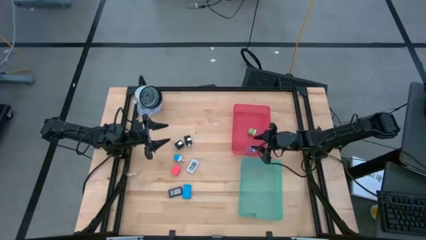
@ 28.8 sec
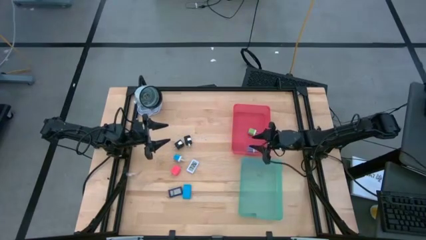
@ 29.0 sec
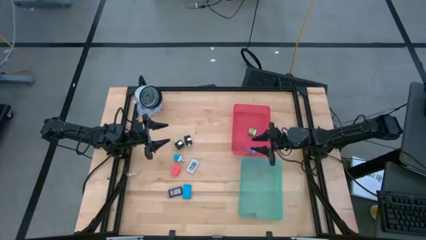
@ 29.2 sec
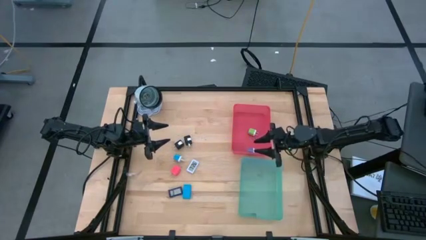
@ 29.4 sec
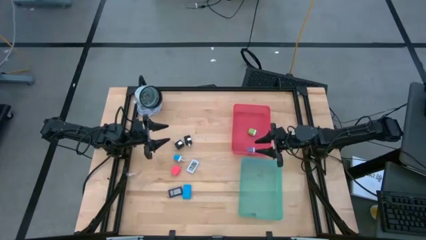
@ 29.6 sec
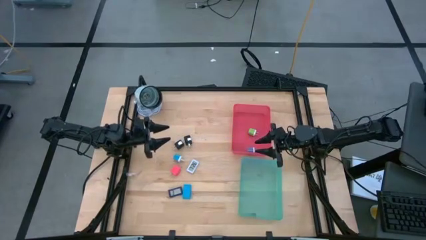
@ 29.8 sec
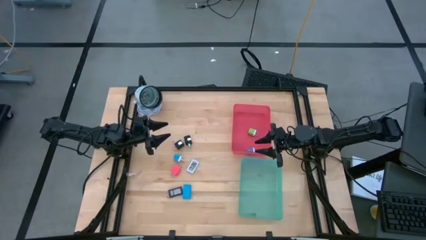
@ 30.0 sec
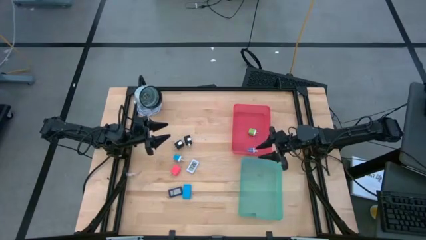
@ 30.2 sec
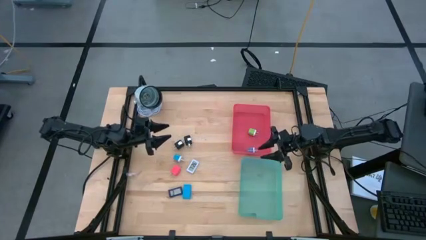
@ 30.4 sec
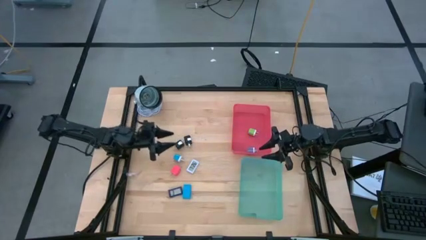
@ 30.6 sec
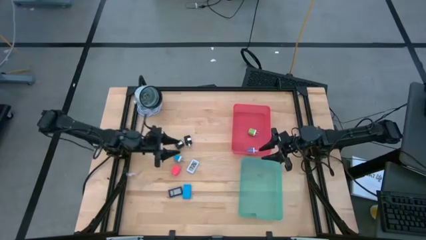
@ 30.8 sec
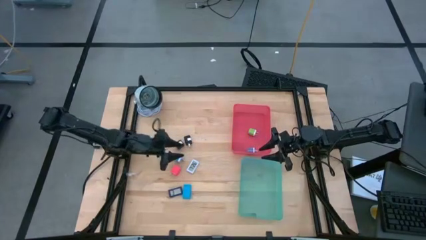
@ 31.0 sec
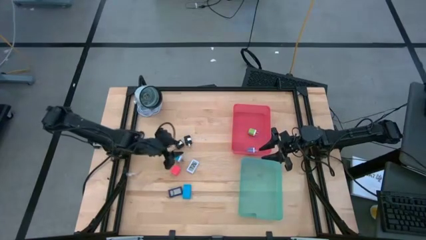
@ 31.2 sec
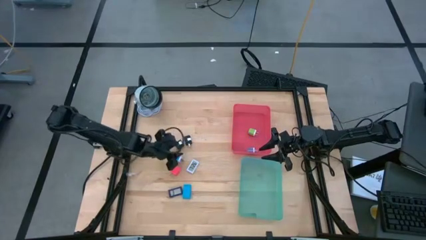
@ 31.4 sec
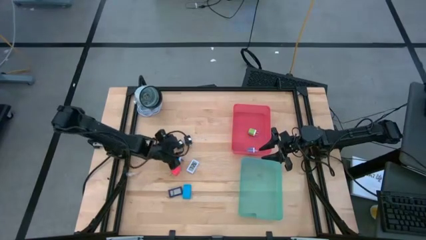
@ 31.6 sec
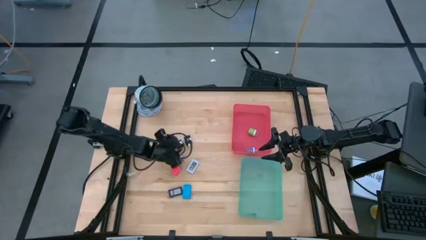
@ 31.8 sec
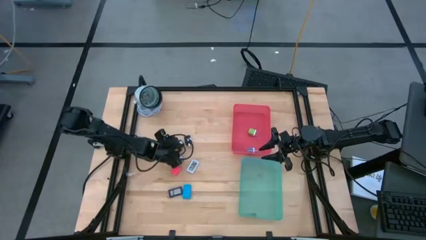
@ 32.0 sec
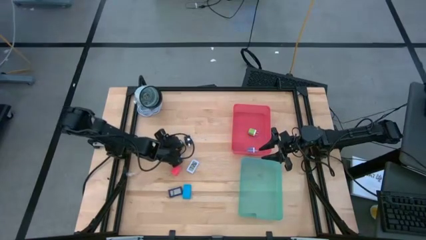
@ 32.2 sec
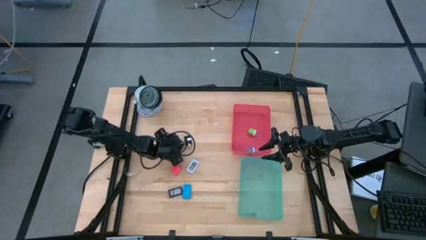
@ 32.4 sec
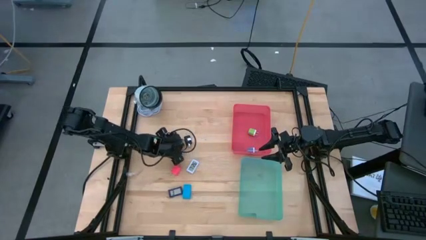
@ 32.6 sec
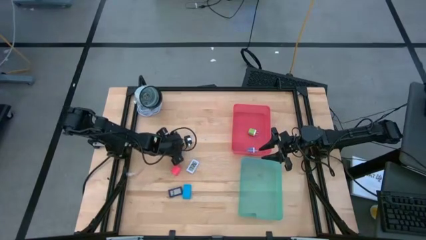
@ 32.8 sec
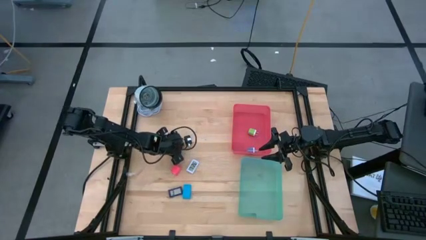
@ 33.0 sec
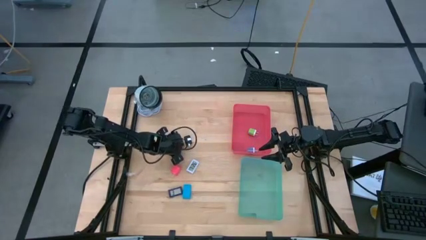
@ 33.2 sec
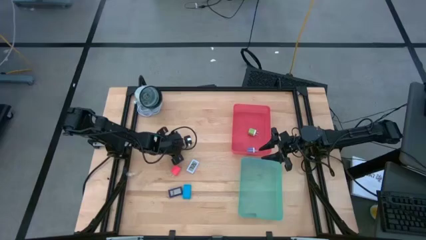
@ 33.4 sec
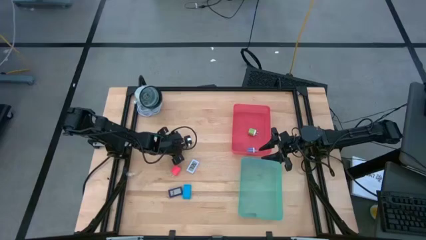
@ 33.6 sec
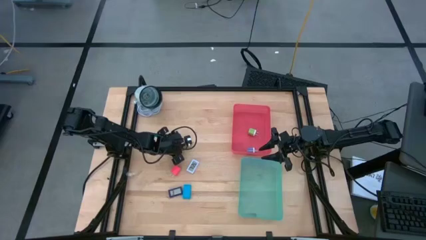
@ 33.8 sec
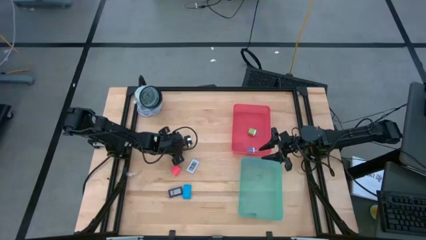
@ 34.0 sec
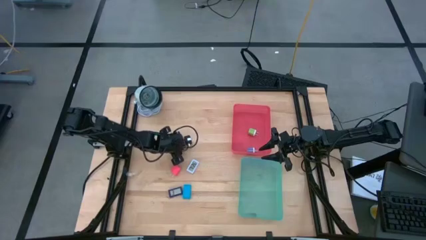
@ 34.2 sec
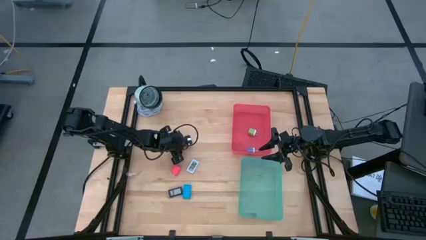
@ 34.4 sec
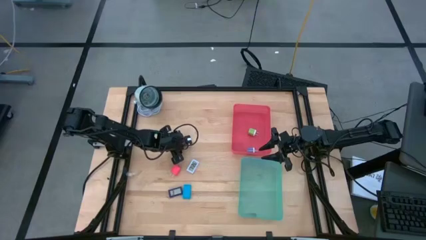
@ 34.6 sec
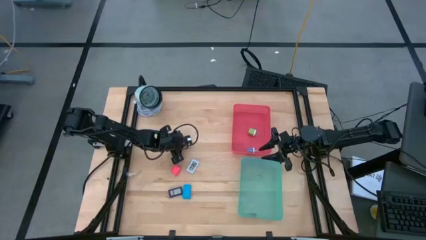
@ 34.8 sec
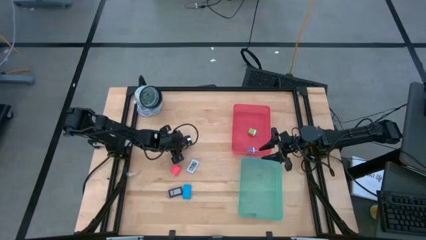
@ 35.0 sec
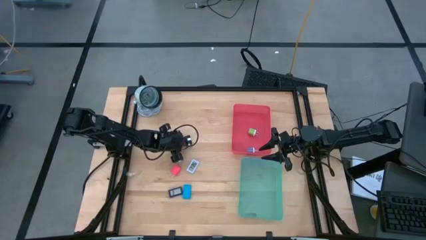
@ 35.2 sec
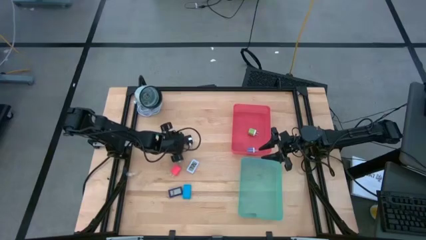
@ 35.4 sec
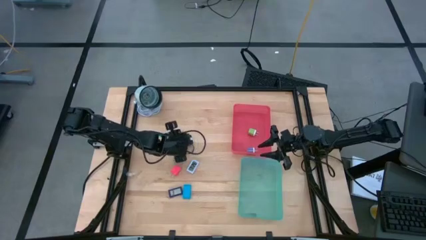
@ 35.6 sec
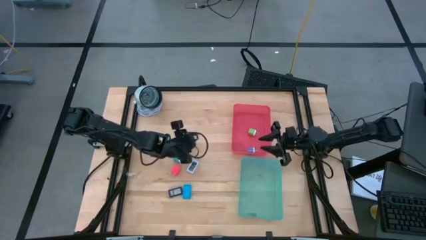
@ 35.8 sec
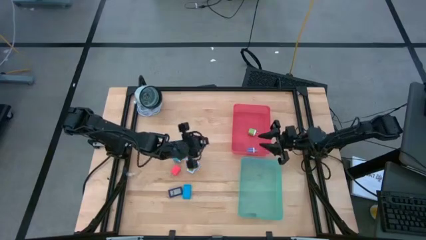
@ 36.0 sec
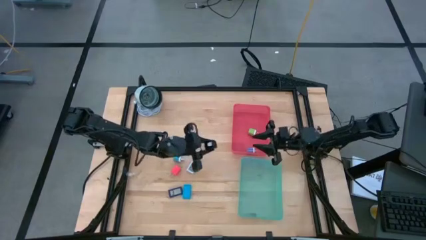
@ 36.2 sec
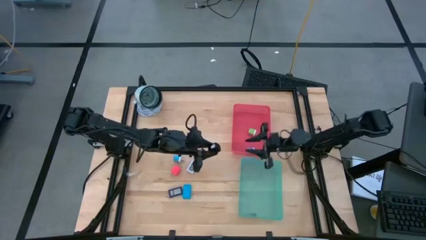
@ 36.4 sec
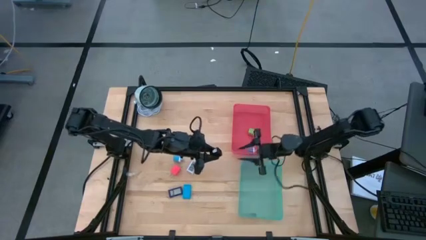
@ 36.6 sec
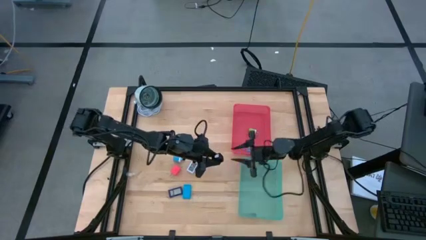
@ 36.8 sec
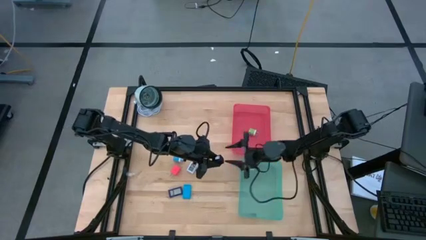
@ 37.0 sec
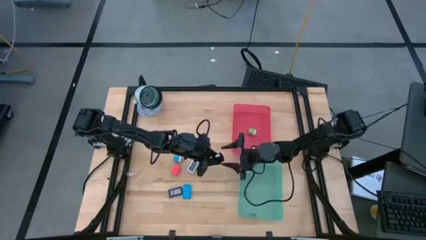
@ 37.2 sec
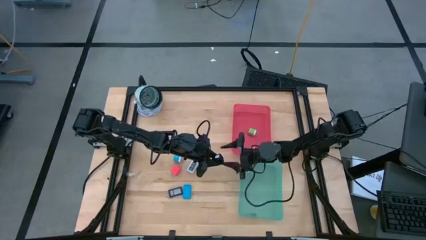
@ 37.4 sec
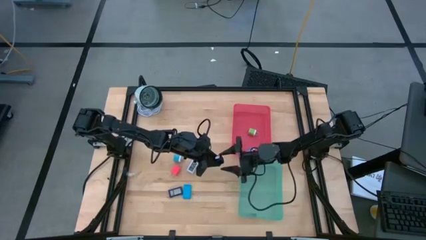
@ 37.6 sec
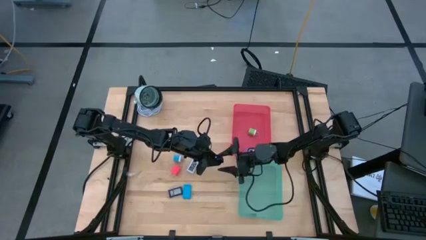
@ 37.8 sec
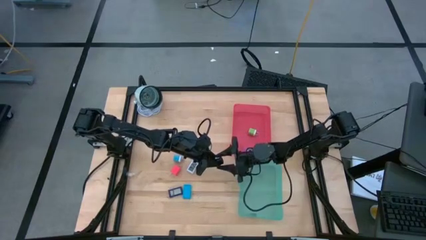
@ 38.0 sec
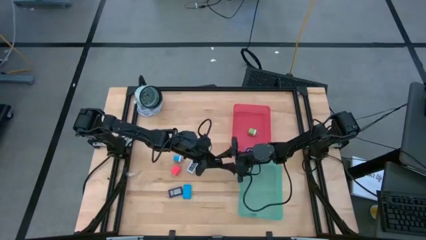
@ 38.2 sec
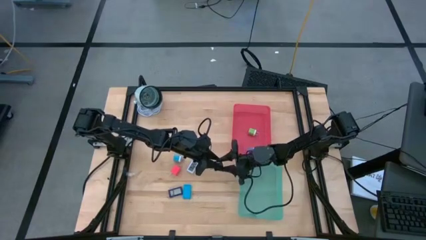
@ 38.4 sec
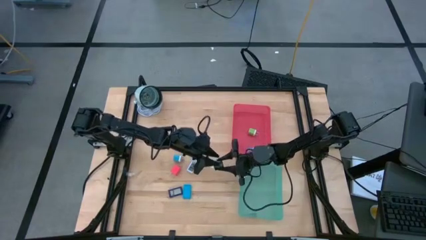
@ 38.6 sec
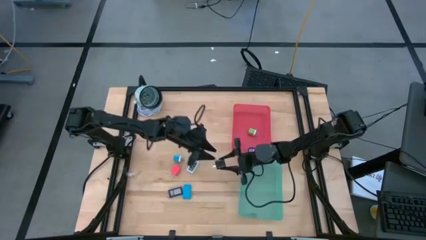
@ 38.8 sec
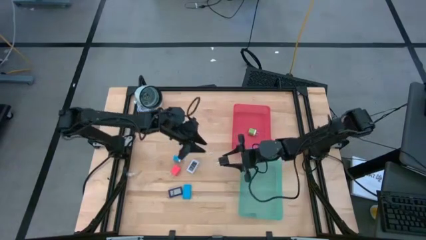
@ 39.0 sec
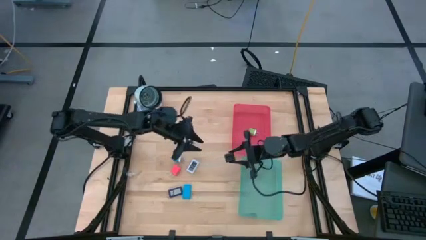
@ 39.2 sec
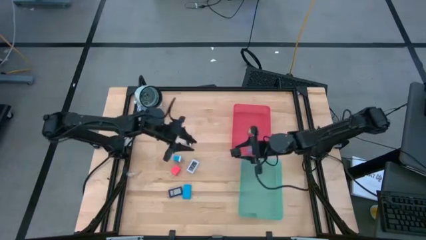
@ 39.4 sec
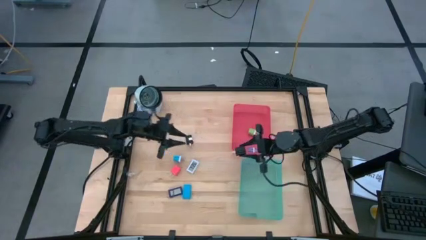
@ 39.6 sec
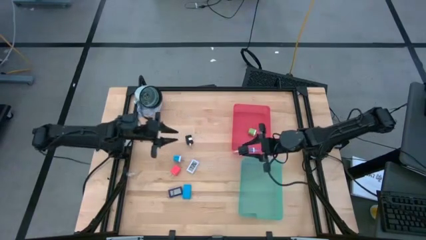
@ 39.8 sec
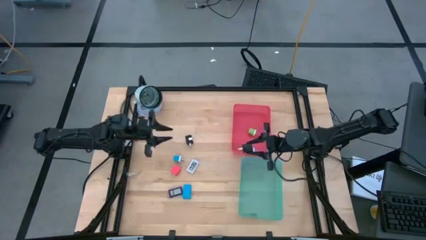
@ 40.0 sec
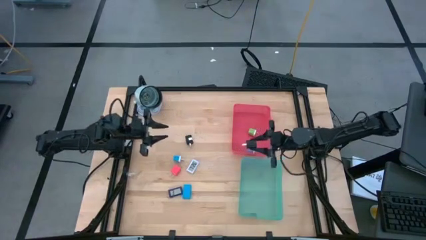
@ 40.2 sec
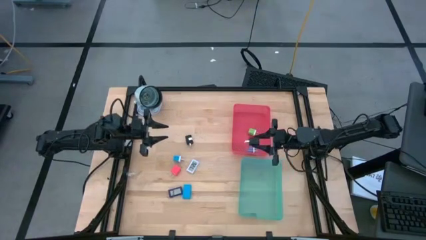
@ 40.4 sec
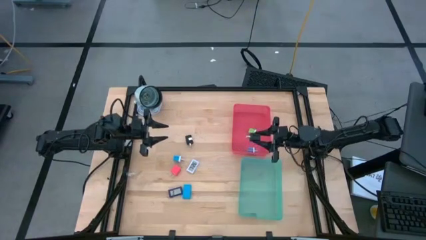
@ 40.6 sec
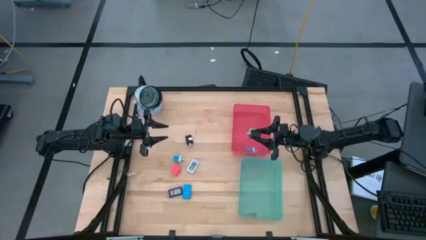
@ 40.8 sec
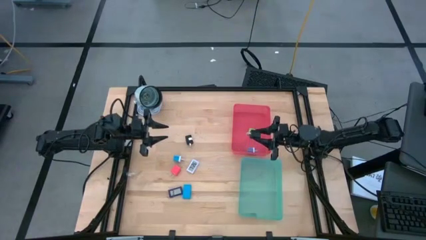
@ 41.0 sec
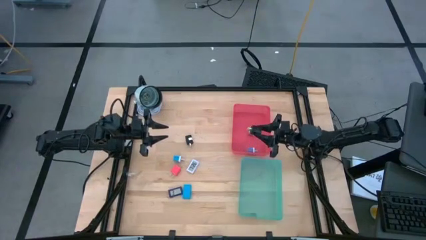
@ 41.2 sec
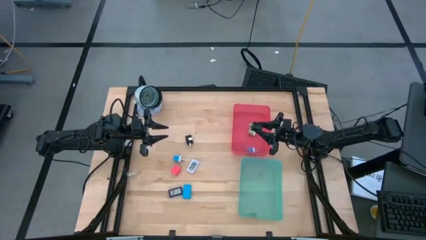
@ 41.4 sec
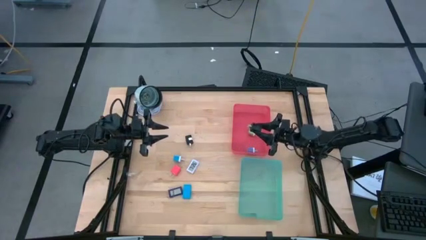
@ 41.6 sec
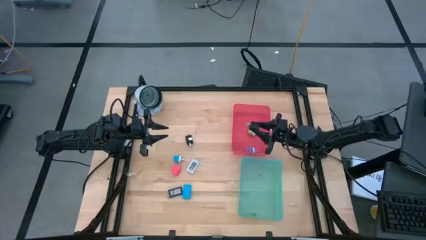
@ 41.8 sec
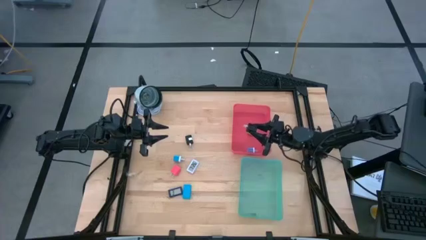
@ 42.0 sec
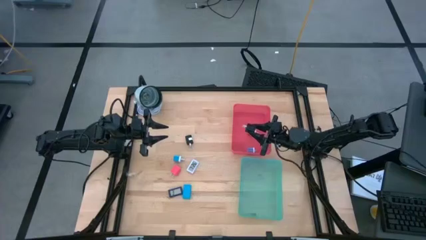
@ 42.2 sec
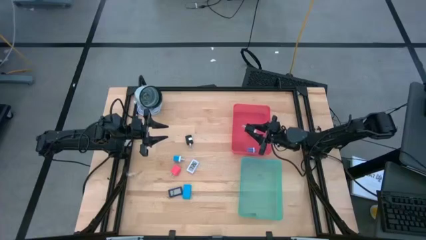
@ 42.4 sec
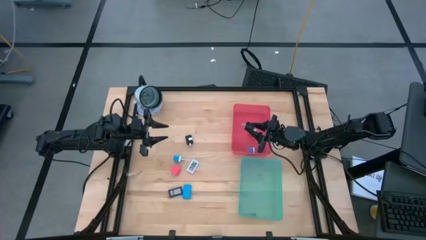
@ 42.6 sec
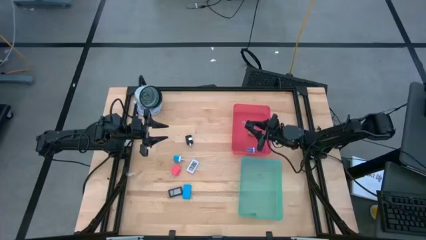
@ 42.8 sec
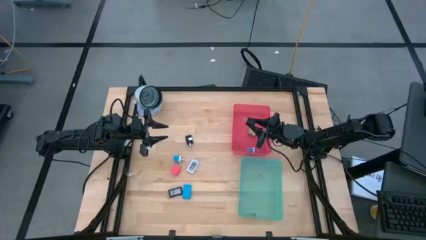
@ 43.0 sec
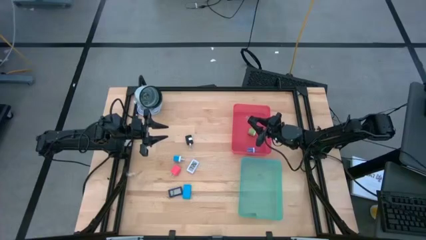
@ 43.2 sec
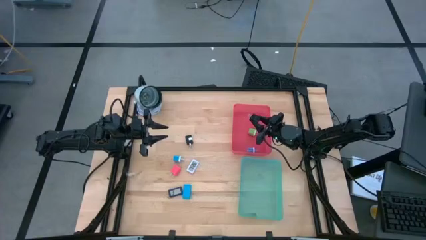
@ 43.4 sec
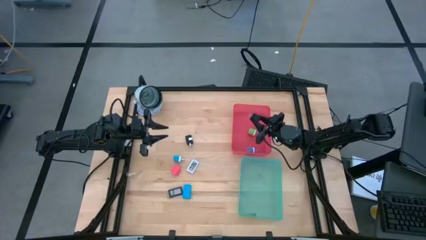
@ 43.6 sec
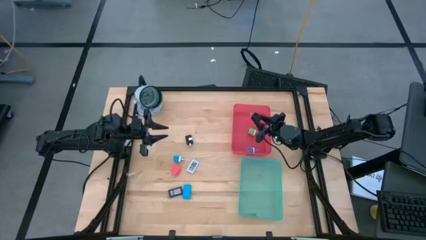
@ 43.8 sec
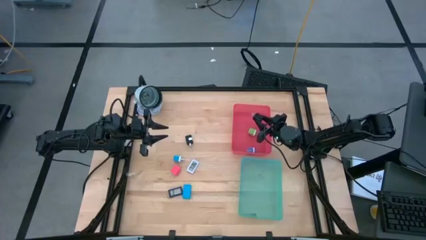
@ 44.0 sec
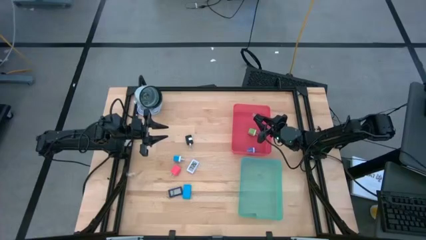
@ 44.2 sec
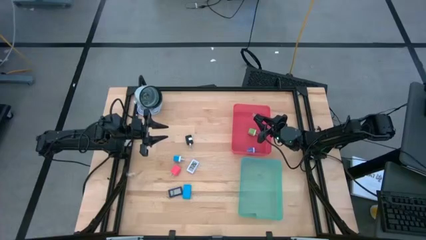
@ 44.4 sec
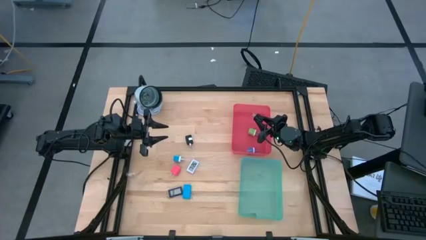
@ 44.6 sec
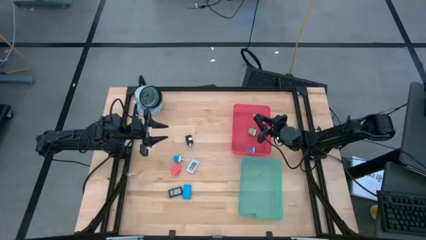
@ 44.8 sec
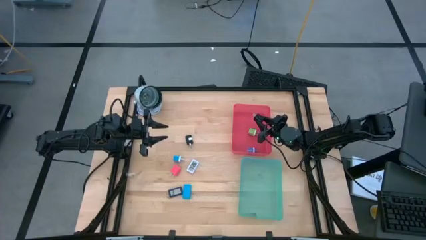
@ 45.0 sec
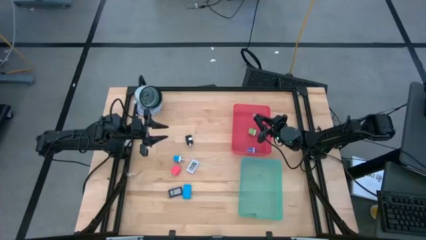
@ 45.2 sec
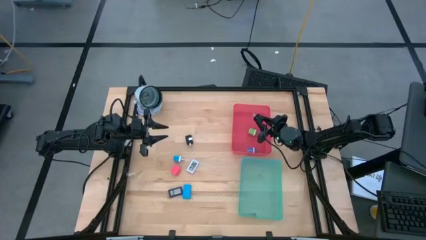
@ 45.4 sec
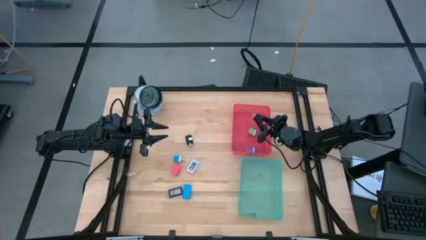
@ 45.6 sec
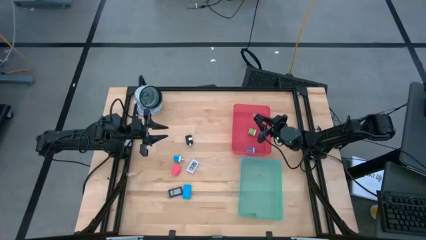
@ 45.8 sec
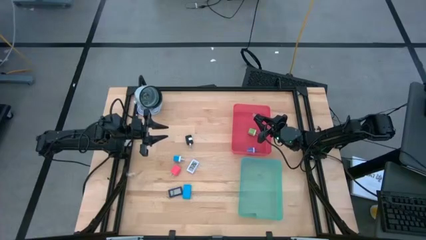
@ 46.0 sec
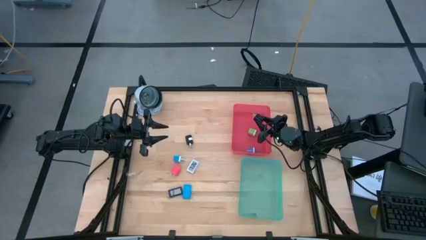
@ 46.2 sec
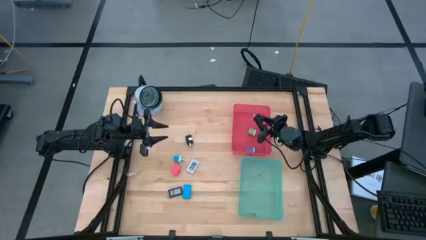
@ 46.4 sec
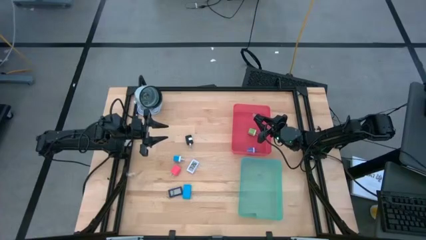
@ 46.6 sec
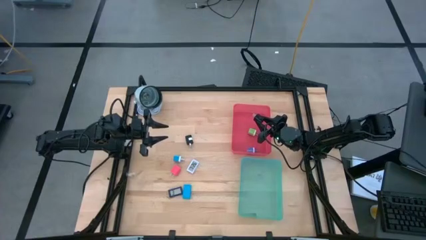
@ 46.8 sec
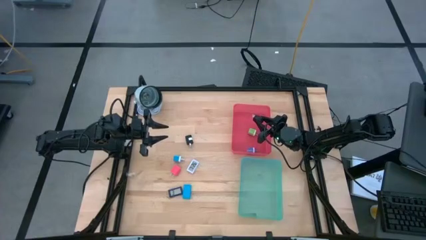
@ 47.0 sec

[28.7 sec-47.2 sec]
Task: Pick & Place Office items
Put the left black charger adapter into the red bin
